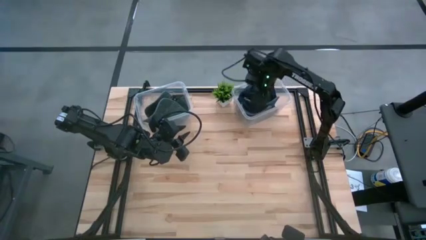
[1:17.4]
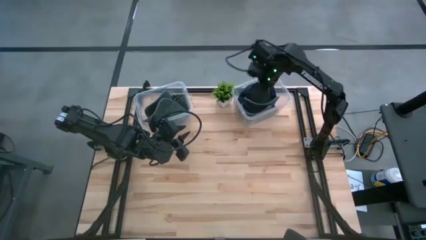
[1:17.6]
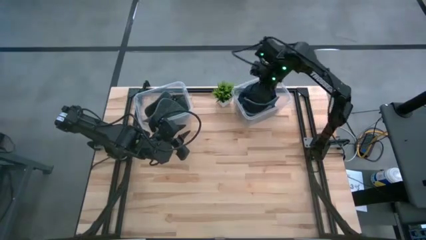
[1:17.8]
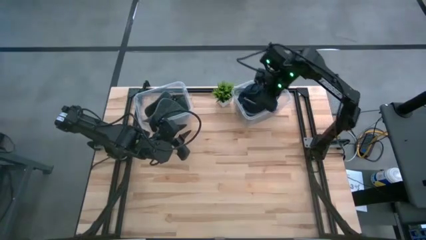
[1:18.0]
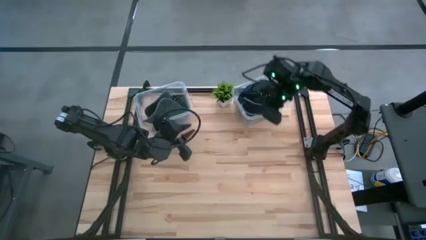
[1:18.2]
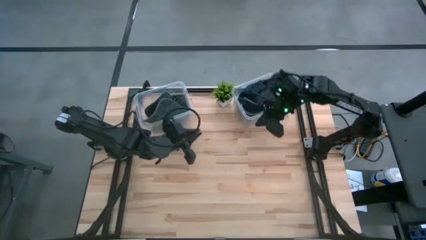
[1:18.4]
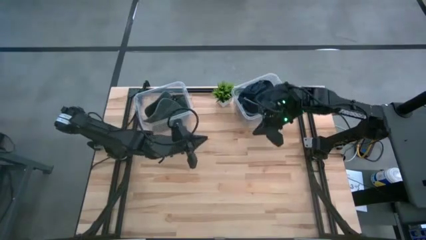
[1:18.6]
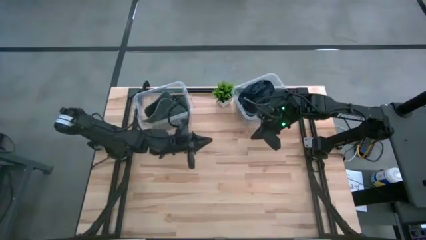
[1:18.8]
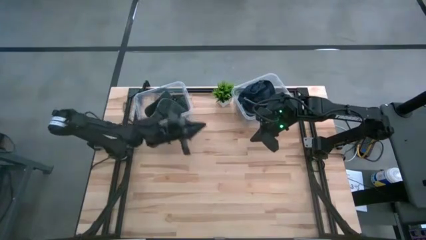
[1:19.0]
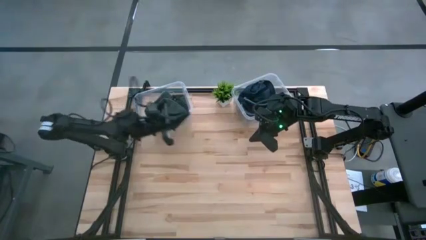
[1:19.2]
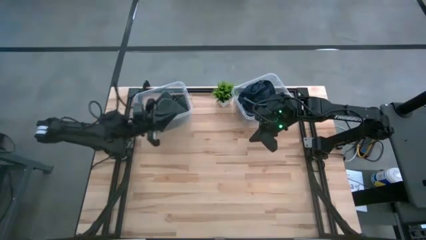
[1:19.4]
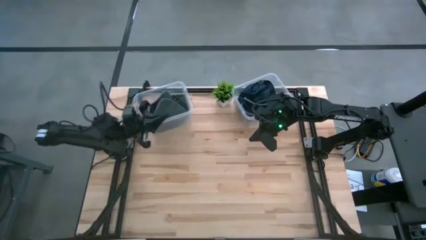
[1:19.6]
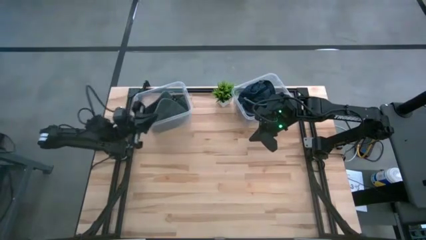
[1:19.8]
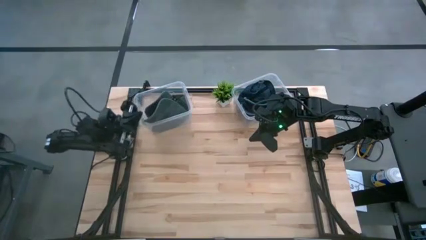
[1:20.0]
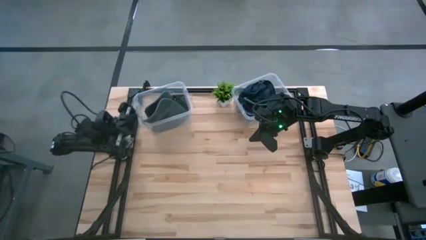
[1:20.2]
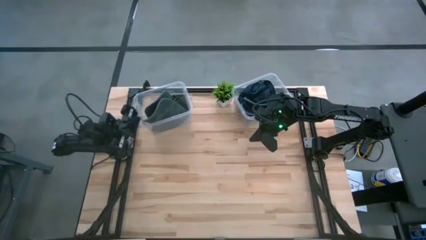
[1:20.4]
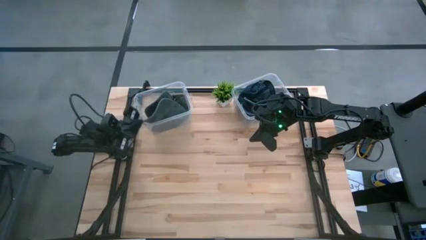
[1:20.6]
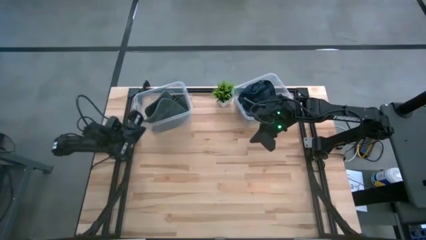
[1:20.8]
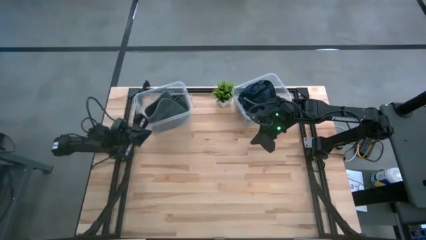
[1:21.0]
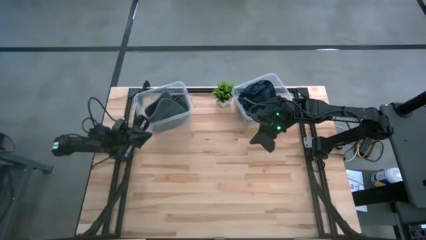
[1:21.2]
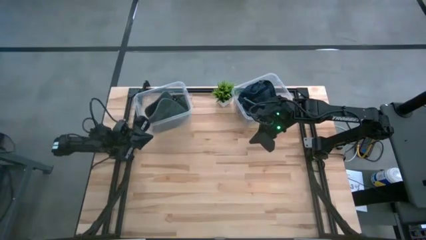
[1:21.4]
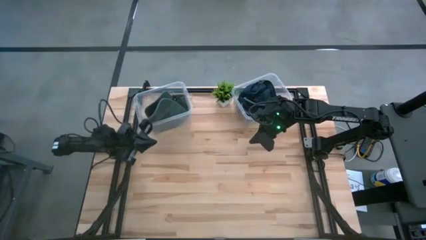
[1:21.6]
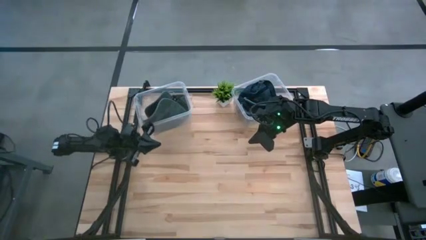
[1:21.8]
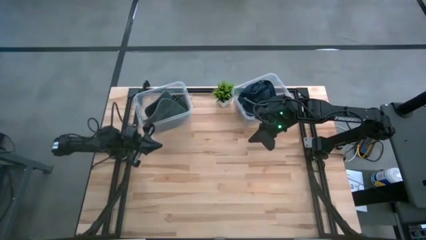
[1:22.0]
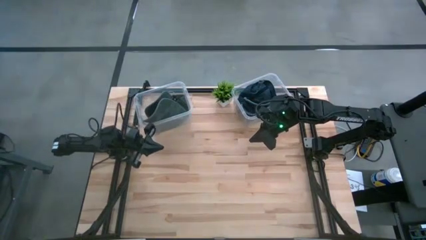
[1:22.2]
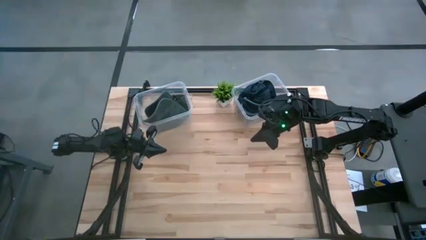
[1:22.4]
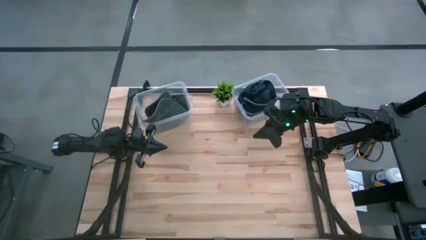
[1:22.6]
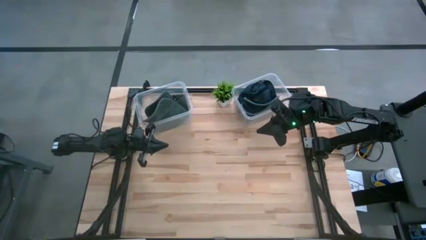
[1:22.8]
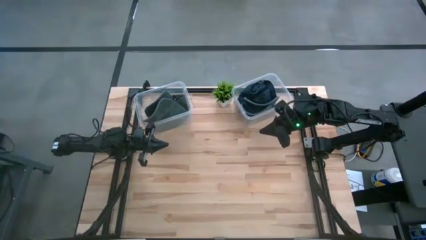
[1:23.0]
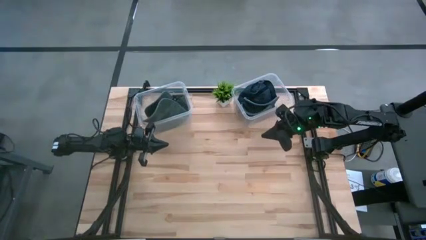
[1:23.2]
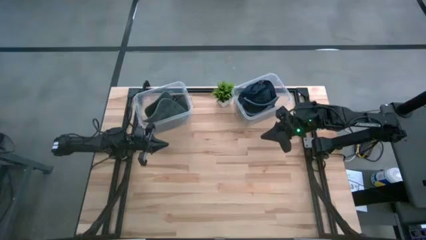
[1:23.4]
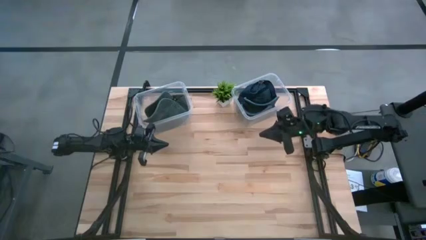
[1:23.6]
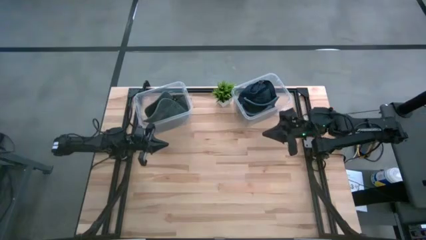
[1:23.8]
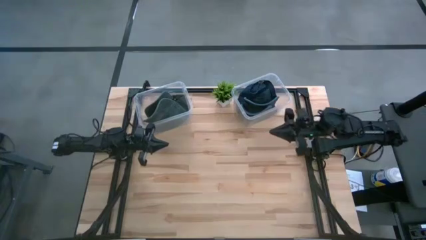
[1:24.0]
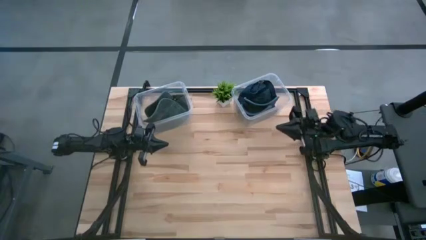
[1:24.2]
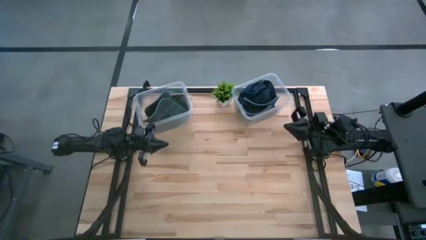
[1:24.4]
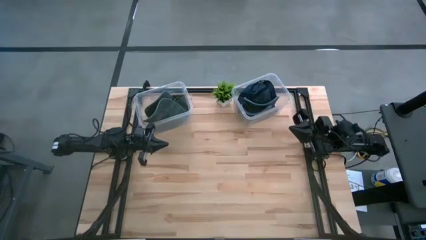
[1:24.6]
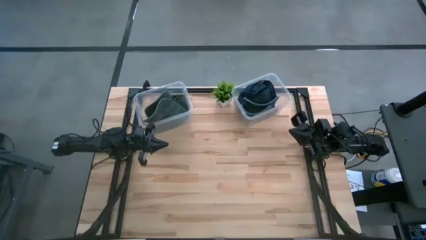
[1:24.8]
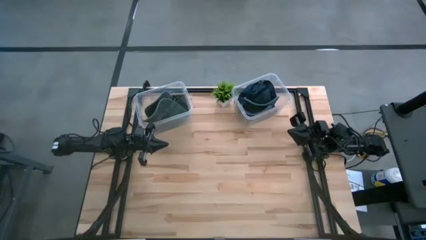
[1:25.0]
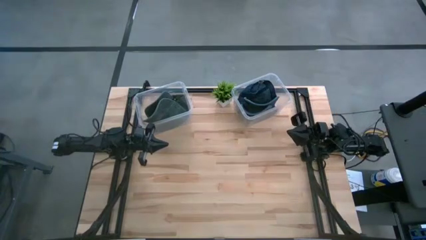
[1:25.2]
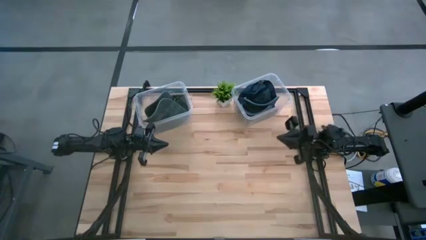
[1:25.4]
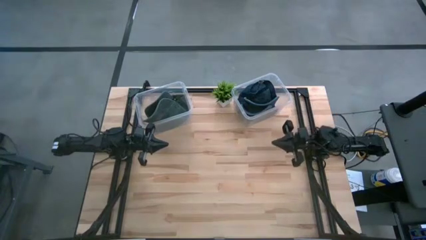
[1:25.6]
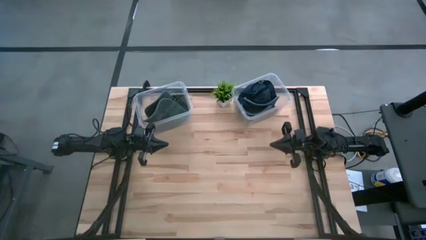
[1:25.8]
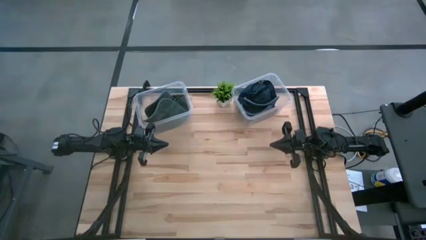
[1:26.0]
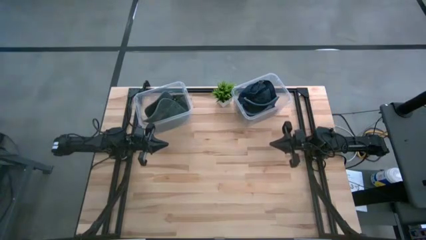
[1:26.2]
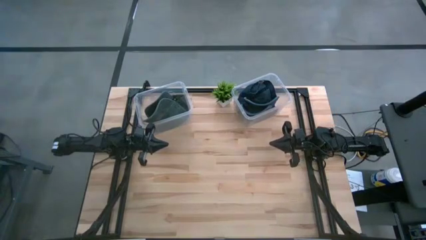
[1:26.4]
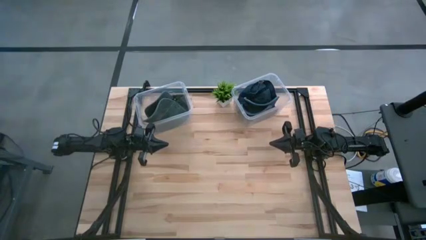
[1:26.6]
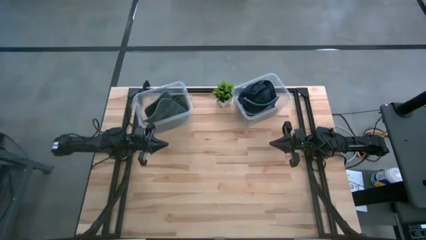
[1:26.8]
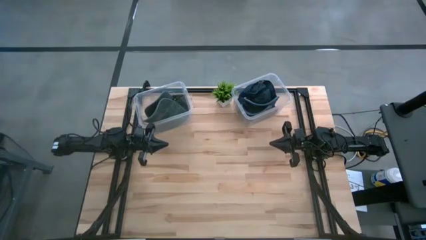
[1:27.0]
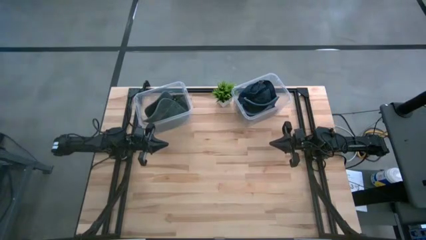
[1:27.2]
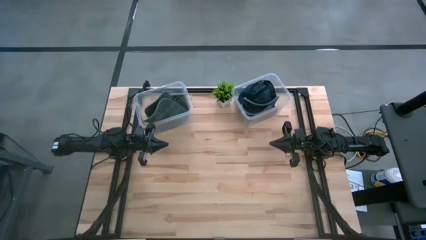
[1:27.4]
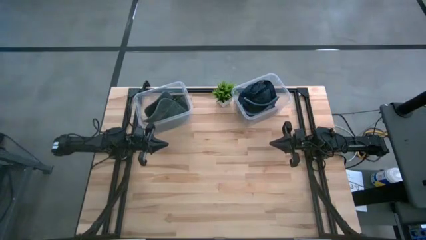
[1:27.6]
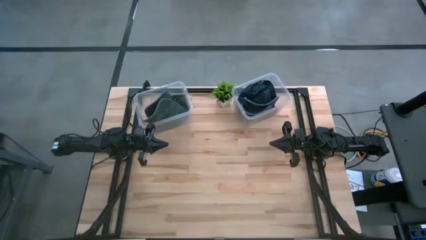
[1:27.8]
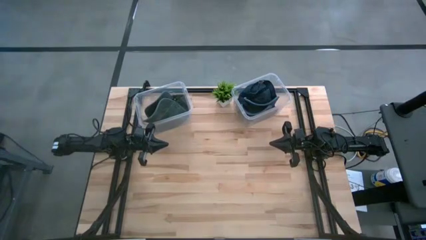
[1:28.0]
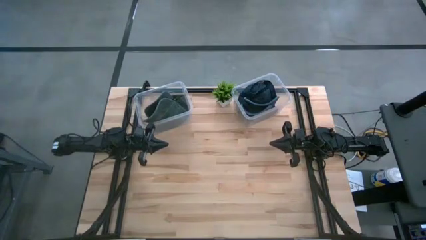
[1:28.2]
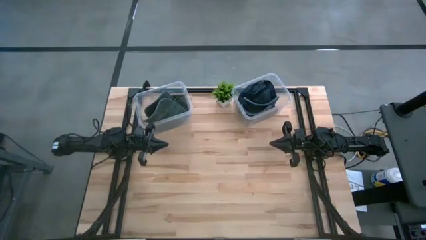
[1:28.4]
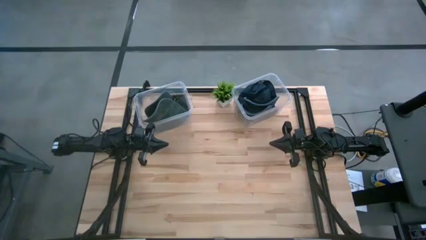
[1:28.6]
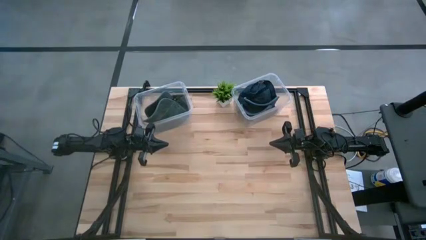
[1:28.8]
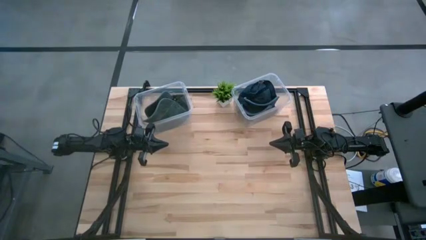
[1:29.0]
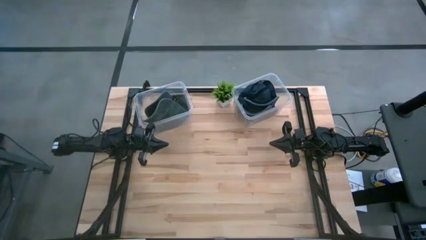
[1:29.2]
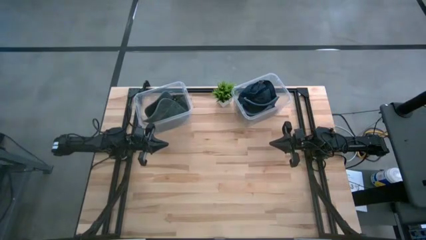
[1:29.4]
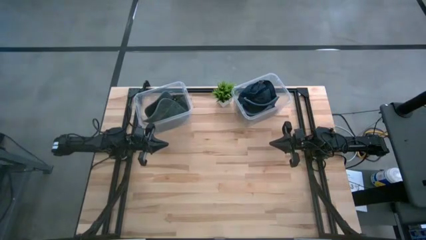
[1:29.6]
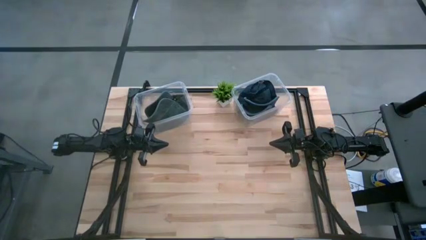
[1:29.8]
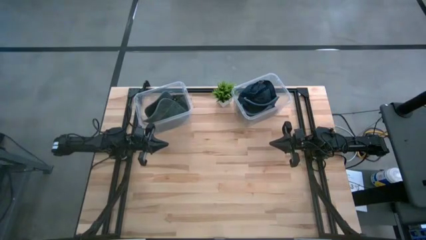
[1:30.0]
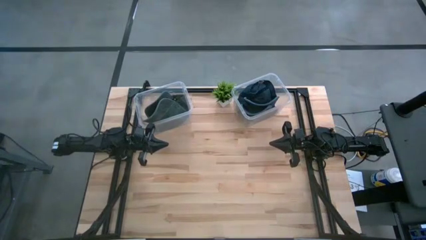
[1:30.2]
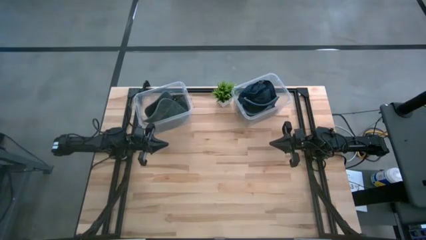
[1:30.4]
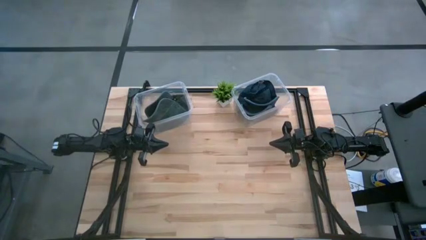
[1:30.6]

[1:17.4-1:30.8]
Task: Pick & Place hat
Return to Home Position

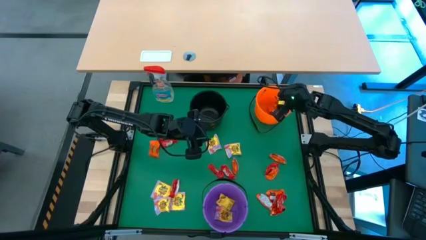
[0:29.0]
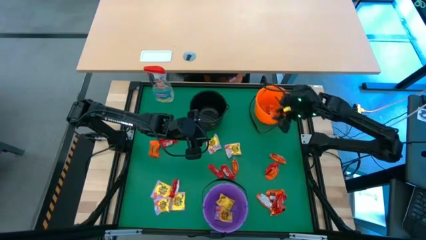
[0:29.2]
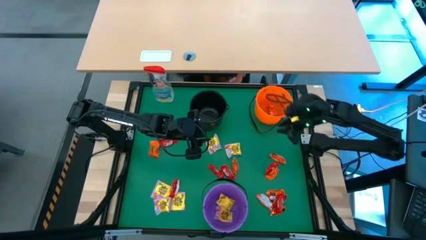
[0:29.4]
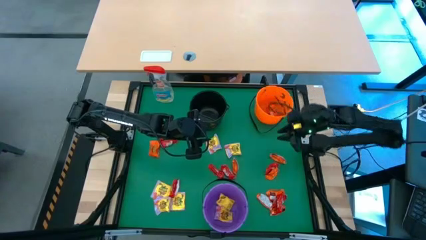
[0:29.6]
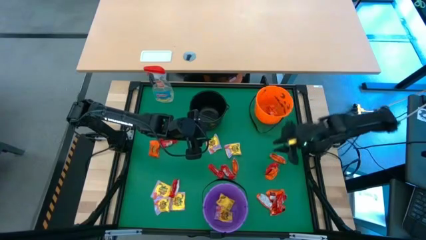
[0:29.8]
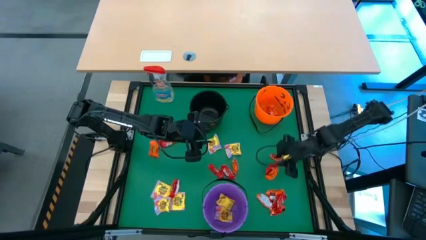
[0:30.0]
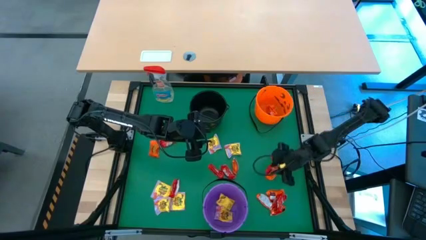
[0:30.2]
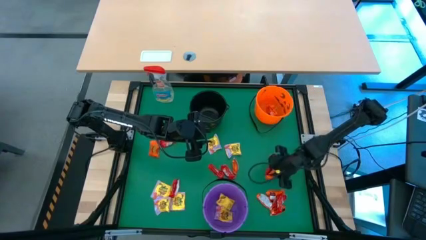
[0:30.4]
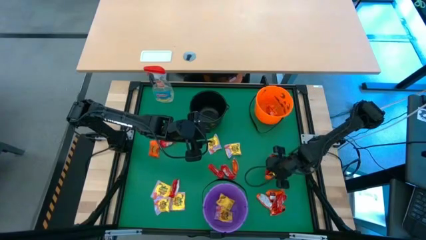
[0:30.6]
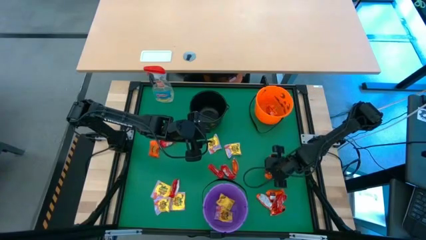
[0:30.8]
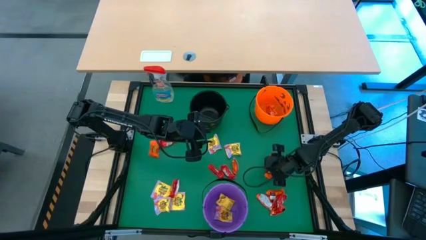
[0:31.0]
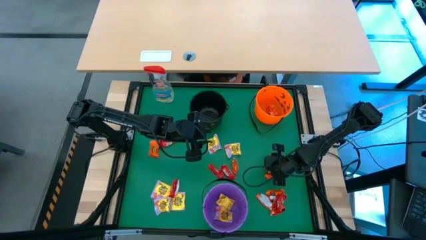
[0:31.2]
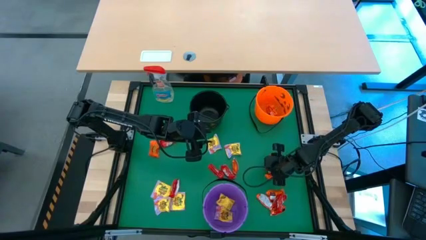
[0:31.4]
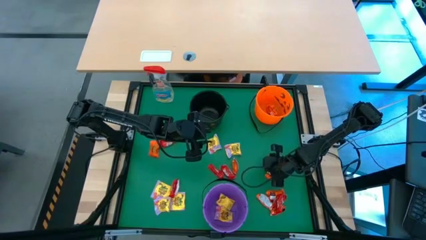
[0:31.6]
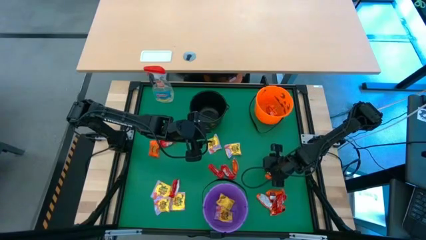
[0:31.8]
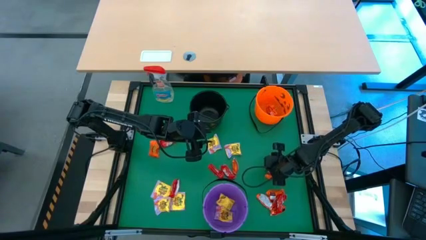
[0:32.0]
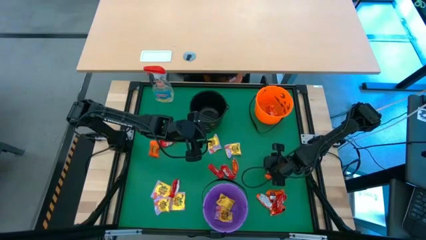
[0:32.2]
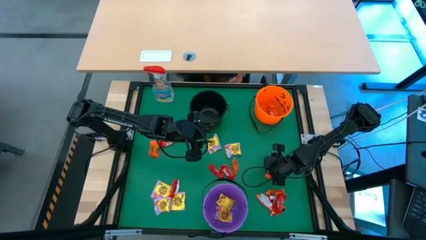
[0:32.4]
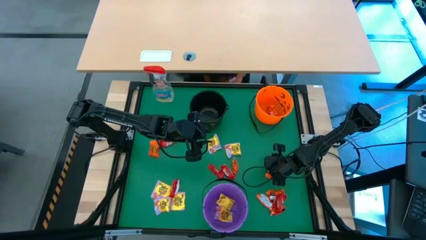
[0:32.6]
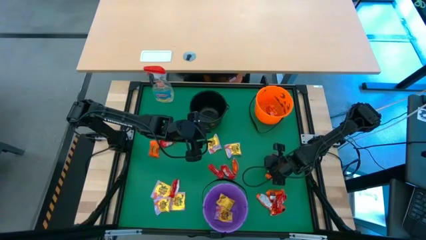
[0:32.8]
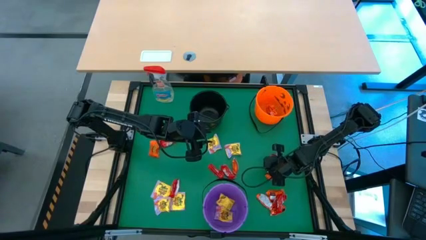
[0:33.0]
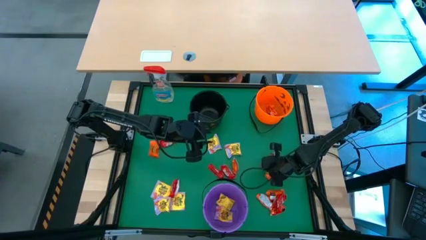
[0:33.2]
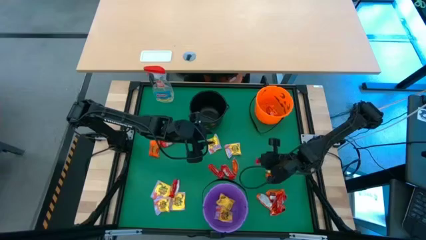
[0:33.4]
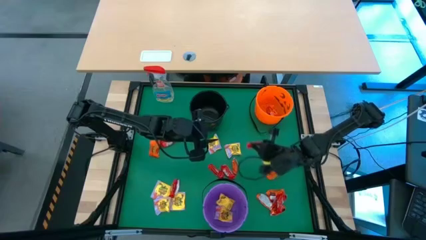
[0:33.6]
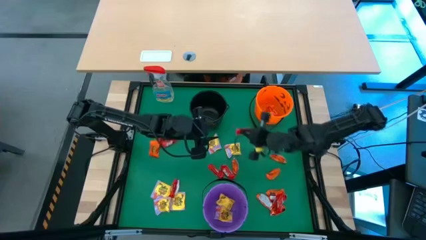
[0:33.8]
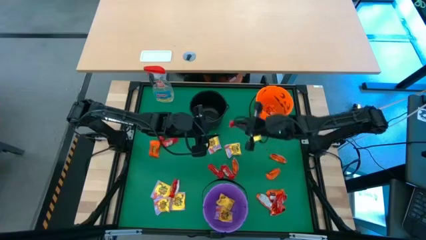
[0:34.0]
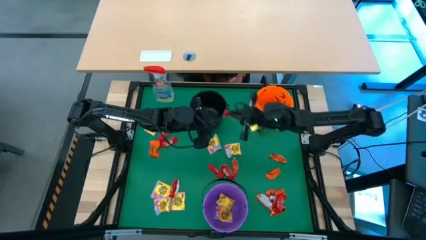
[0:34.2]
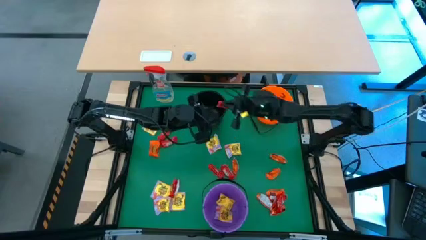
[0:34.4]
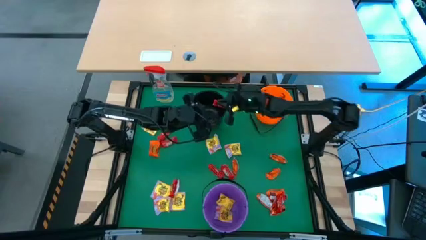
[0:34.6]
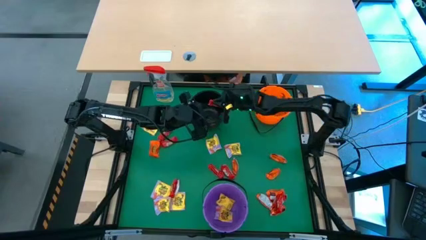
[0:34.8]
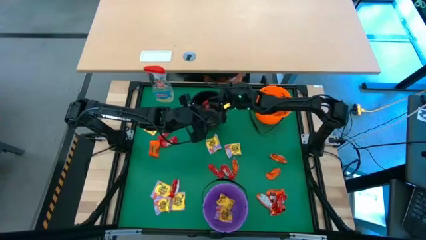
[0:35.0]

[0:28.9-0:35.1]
Task: Sort candy
Put the red chocolate into the black bucket
